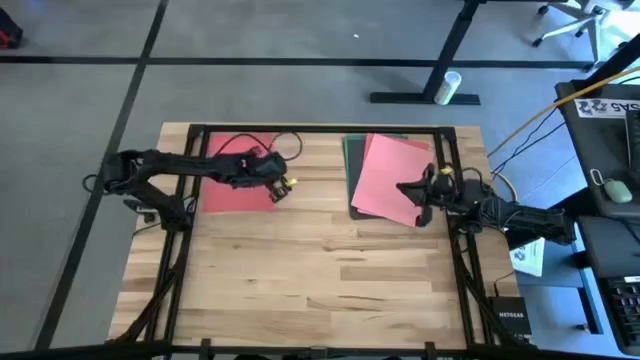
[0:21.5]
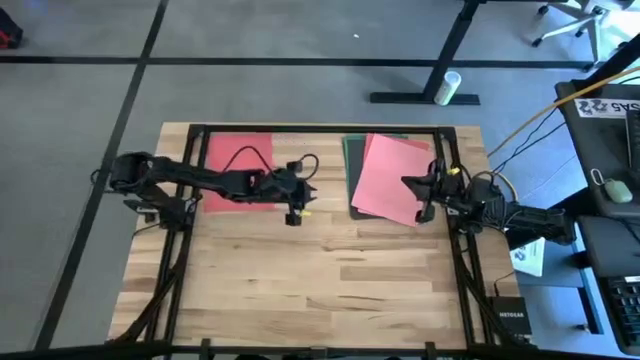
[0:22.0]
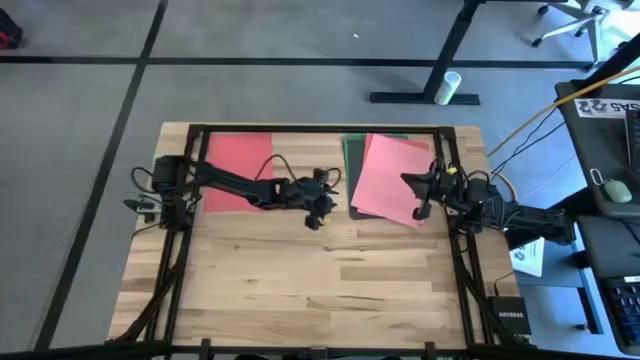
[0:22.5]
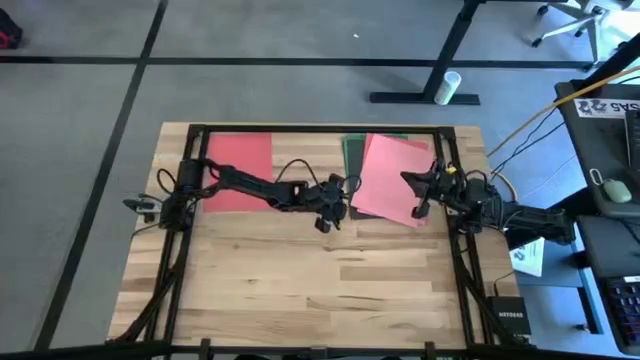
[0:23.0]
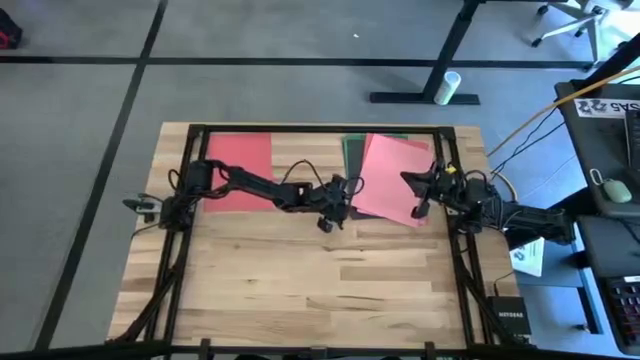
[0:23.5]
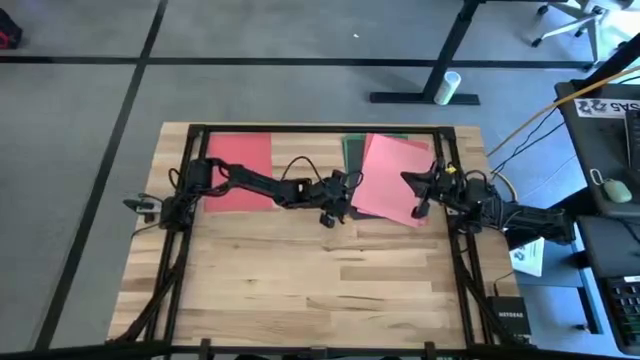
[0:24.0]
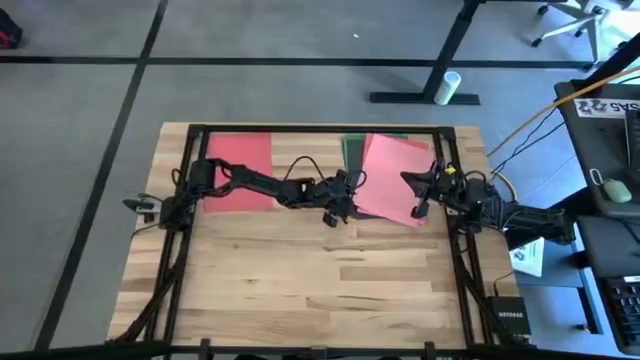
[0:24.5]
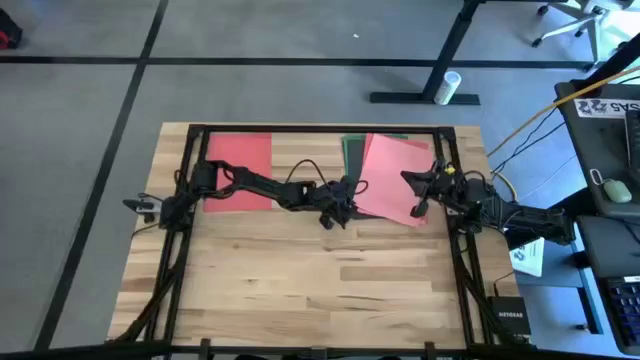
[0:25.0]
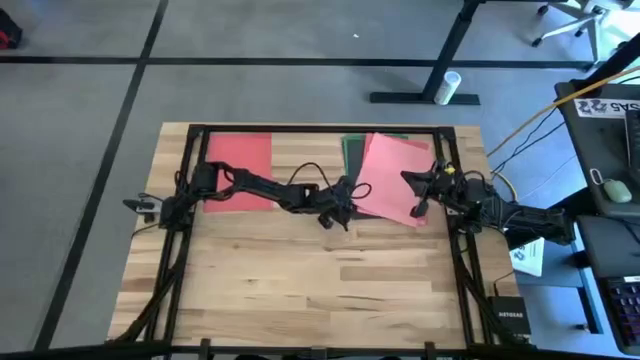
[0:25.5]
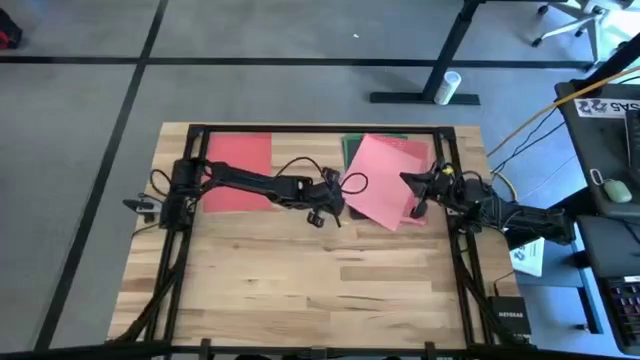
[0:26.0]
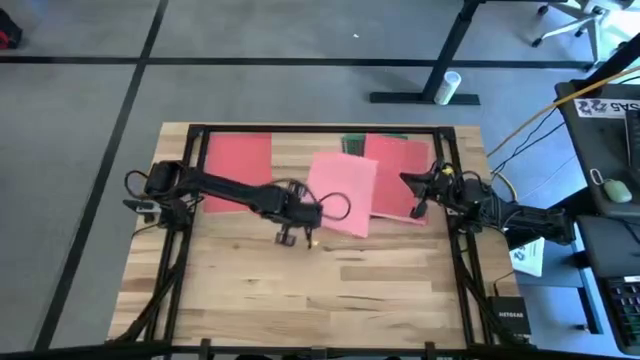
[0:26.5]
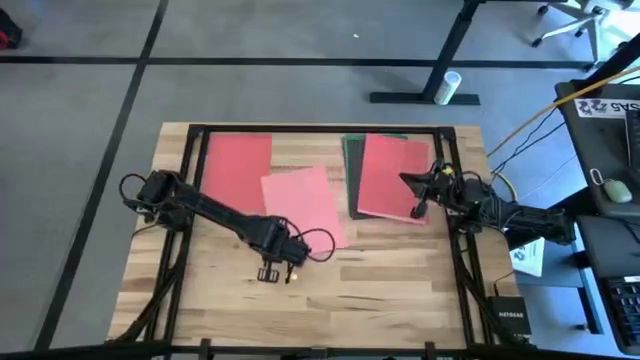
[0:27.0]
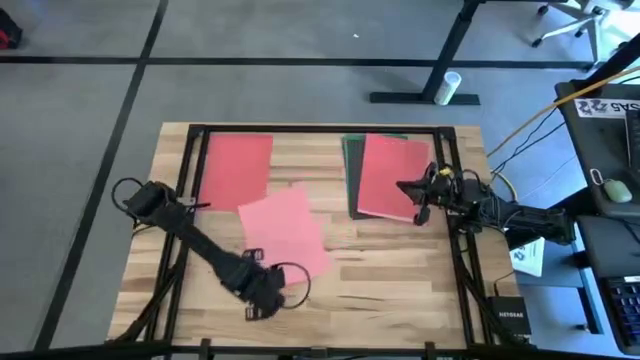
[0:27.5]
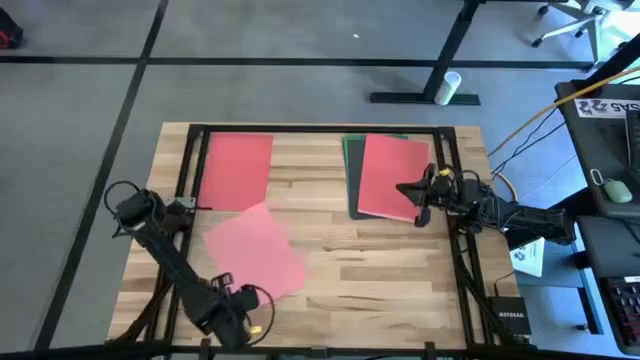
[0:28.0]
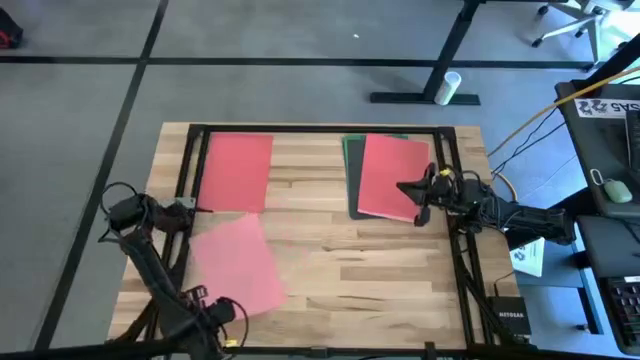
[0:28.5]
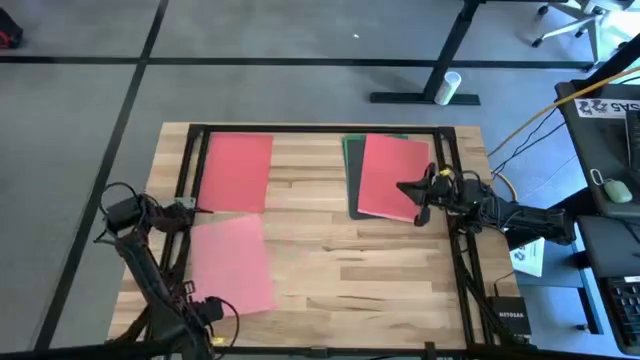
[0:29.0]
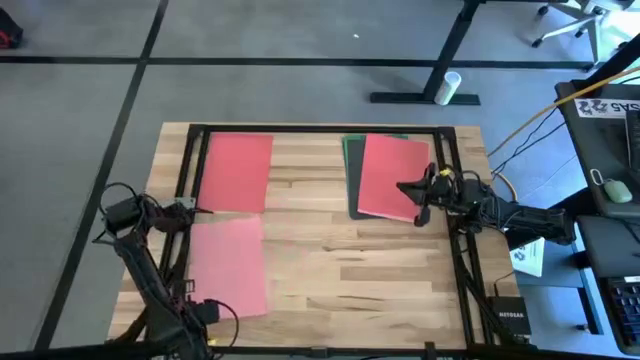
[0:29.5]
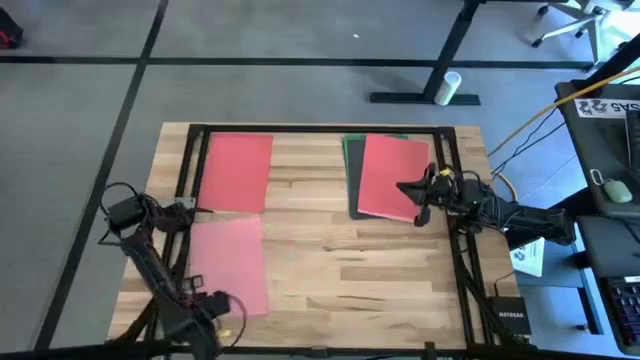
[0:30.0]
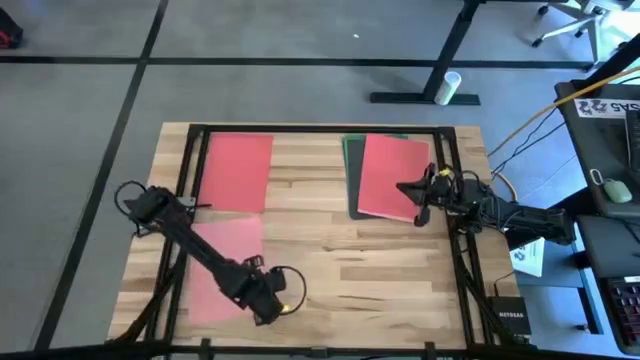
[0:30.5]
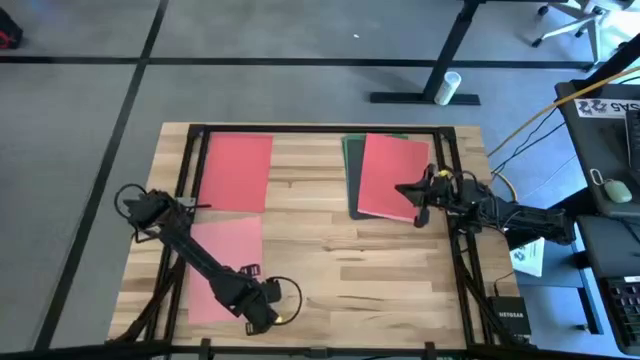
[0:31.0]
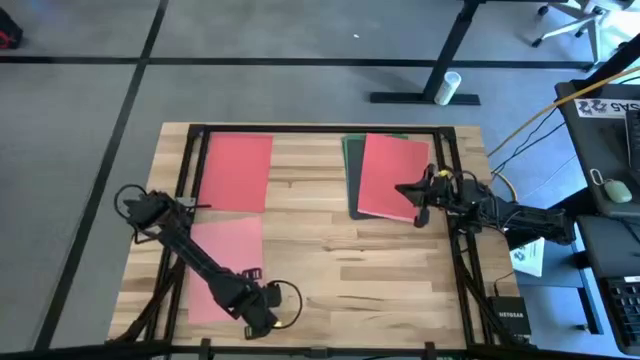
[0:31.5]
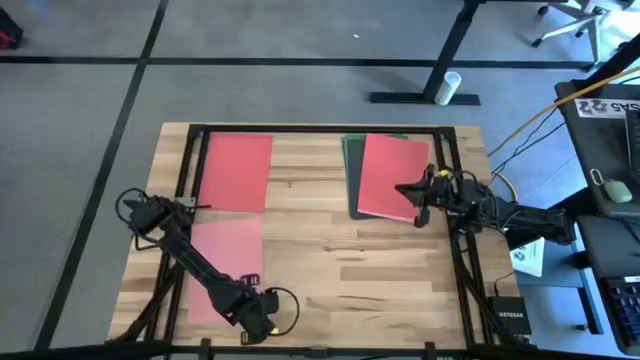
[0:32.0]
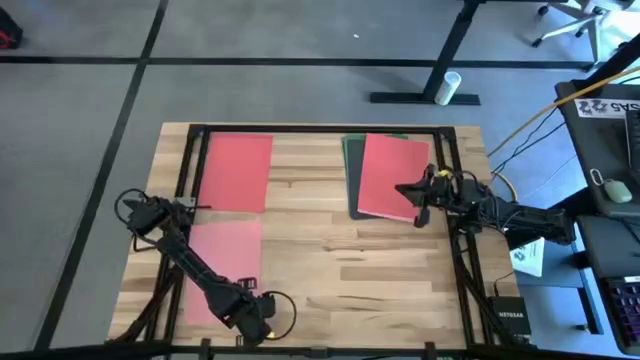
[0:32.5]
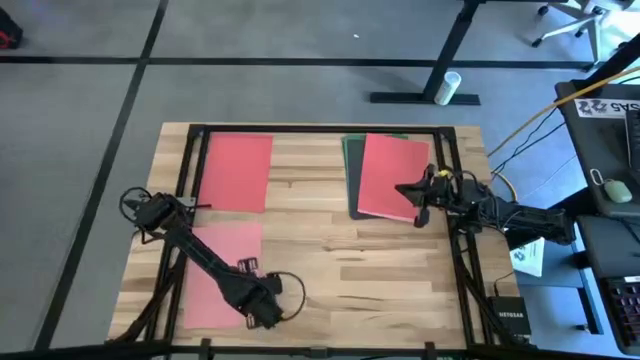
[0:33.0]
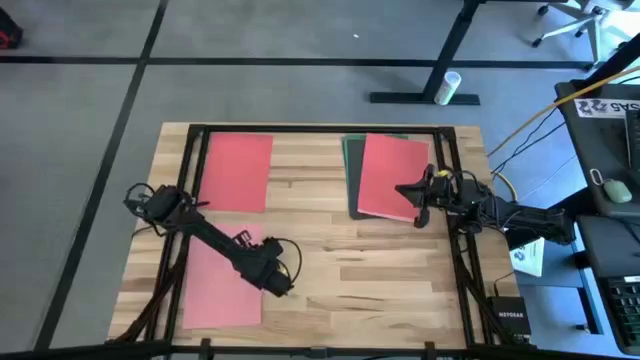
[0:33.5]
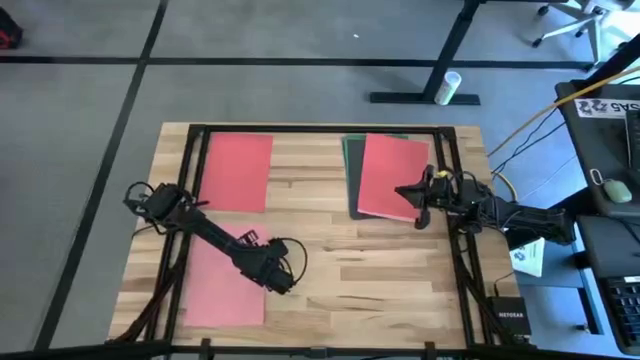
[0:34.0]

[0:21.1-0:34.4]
Task: Organize paper
Put the pink paper on the bottom left of the table

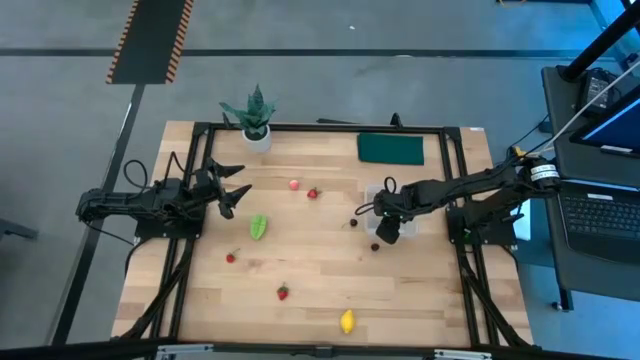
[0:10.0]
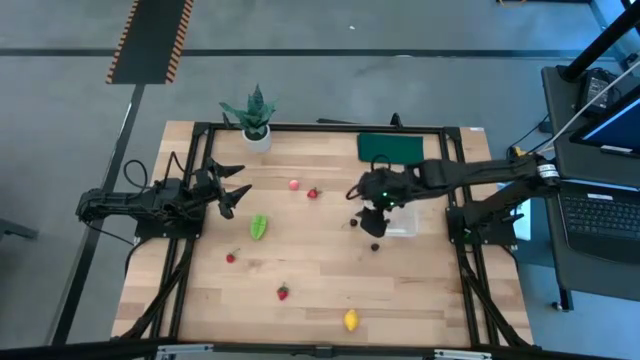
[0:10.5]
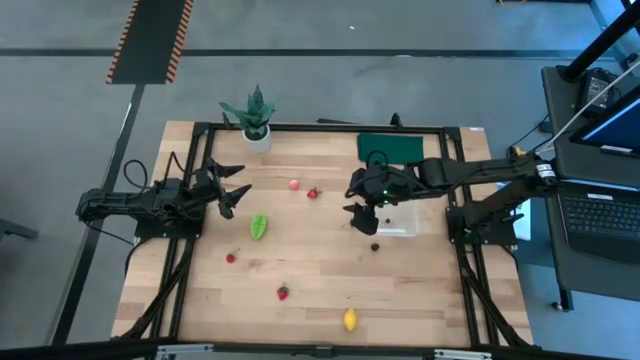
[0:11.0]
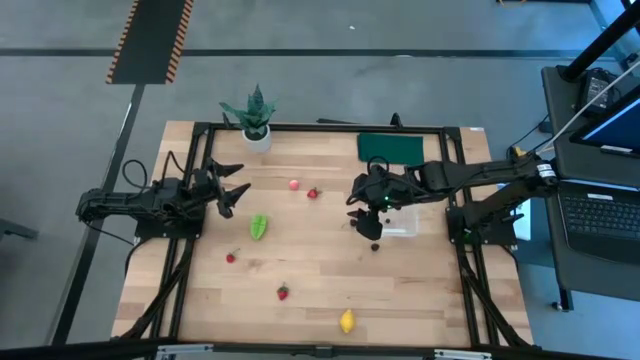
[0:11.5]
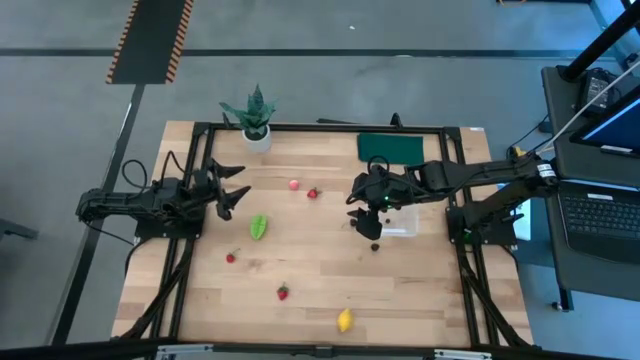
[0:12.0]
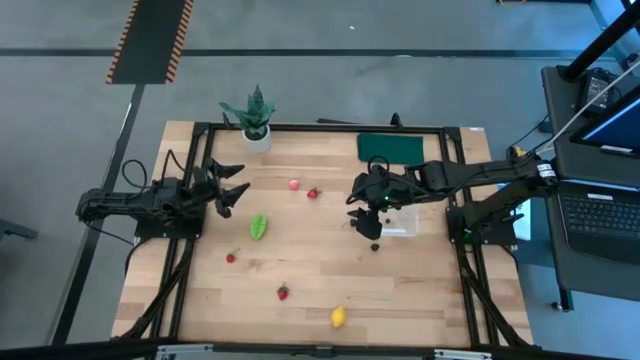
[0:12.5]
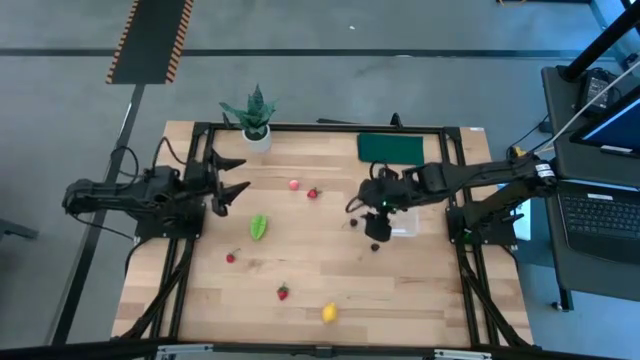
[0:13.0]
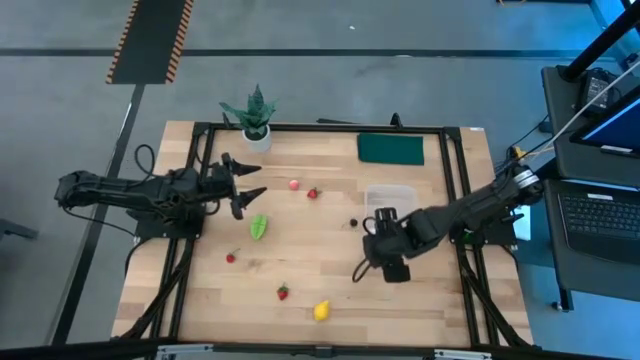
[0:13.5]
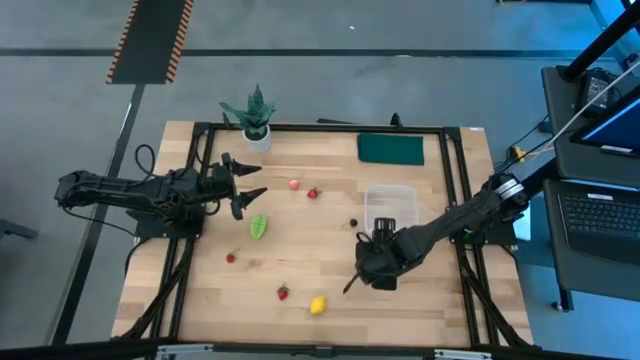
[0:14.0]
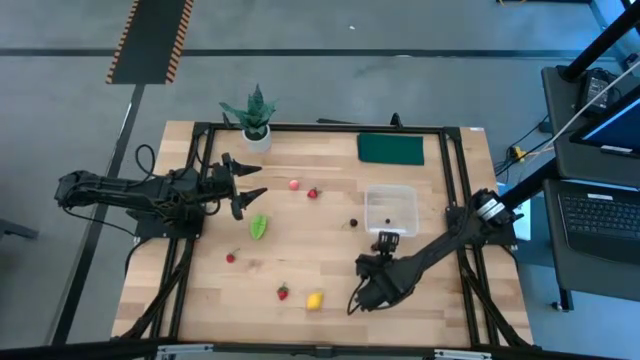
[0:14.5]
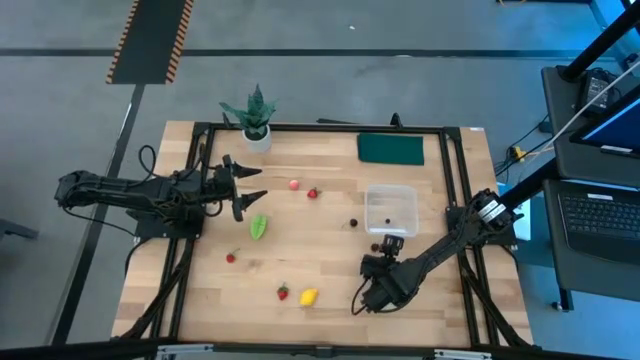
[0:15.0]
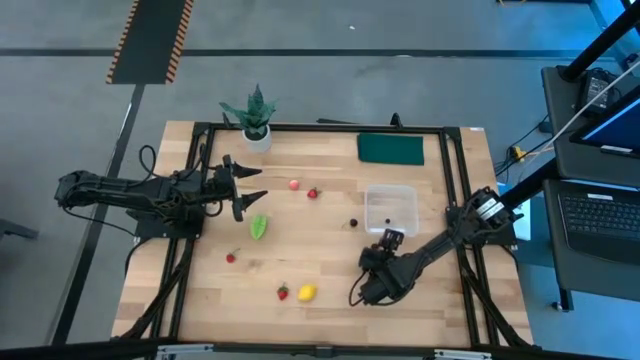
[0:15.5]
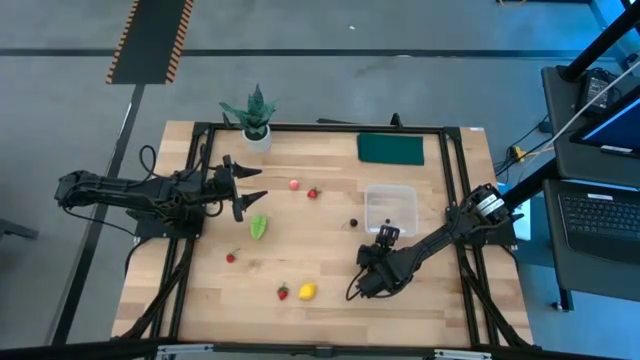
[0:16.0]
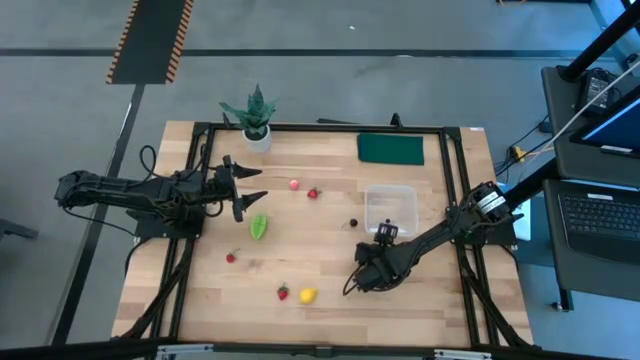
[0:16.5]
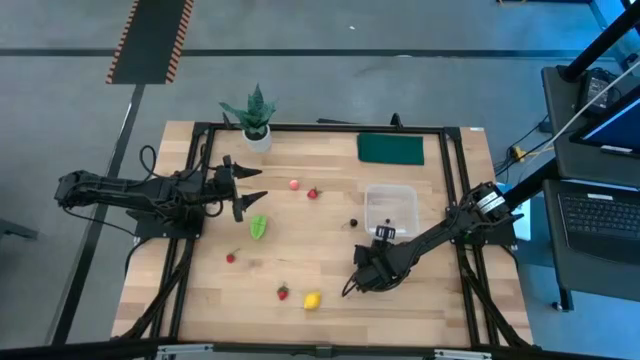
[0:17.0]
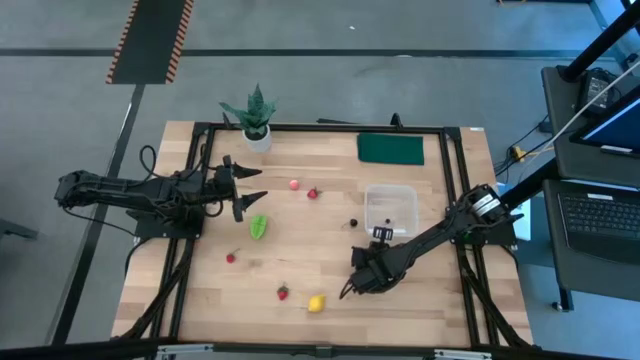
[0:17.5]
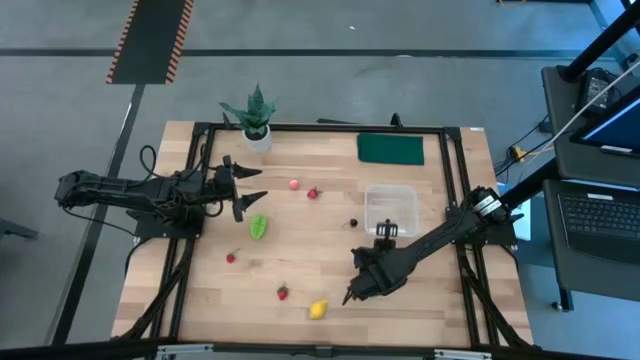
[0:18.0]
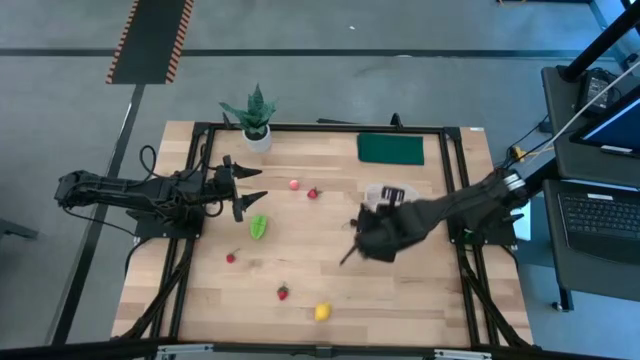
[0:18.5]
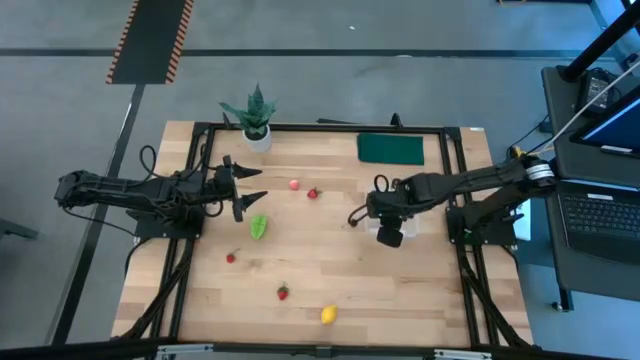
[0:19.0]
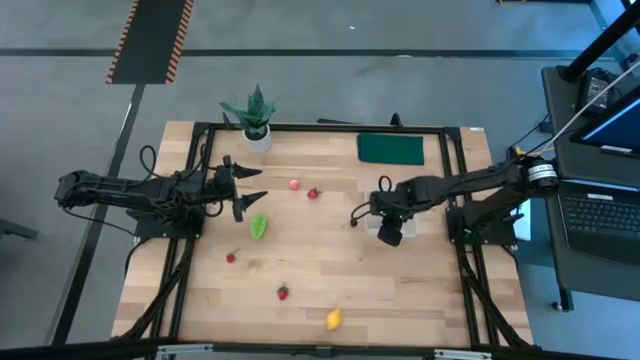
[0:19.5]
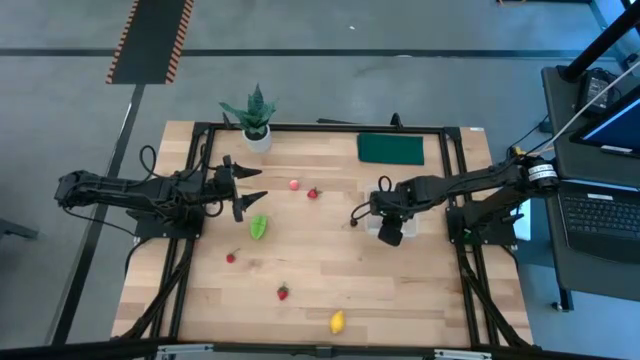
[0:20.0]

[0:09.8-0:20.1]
Task: Pick and placing Produce into tupperware
Put the blackberry into the transparent container
